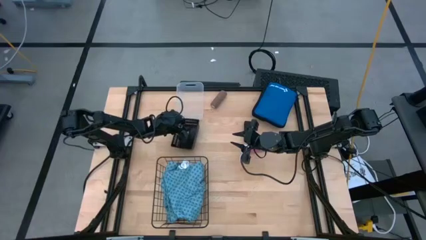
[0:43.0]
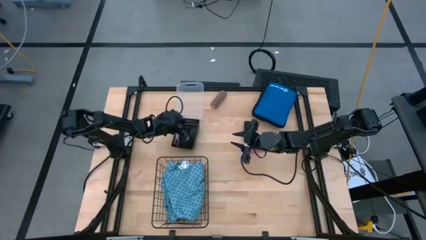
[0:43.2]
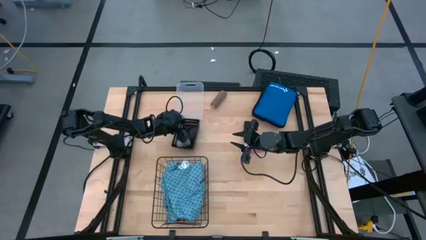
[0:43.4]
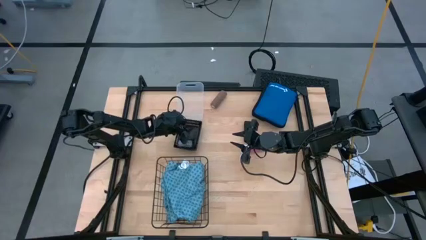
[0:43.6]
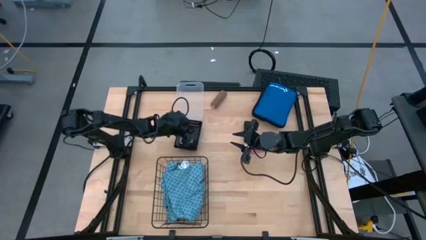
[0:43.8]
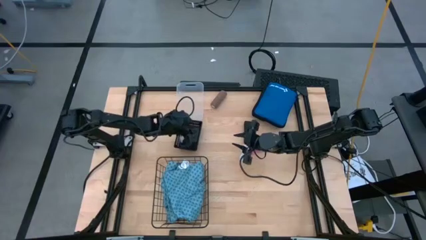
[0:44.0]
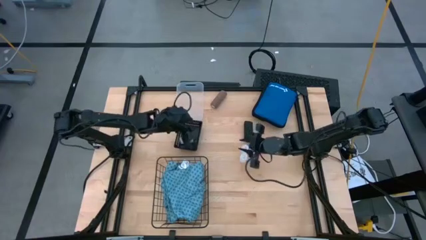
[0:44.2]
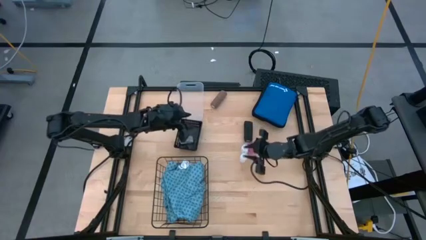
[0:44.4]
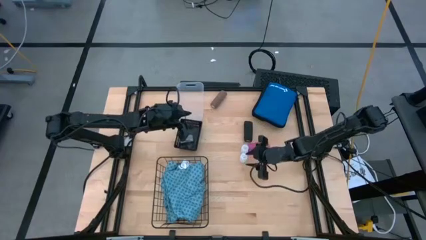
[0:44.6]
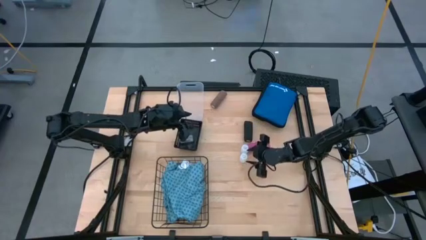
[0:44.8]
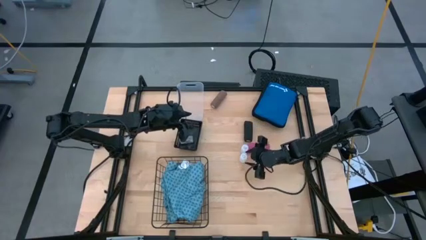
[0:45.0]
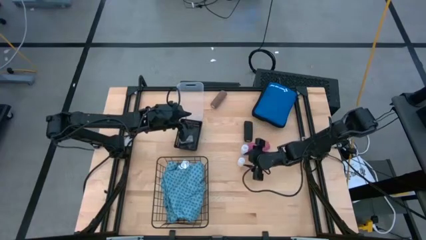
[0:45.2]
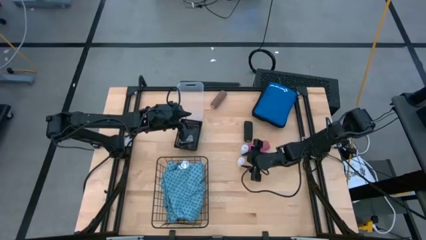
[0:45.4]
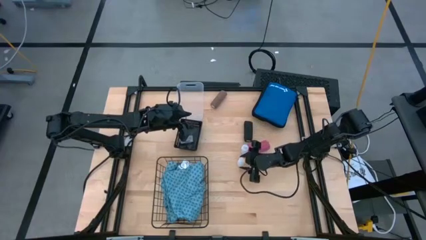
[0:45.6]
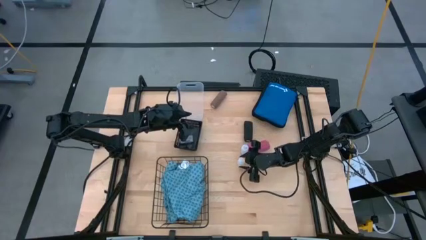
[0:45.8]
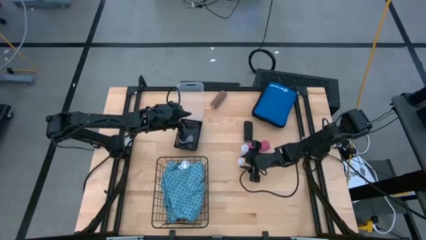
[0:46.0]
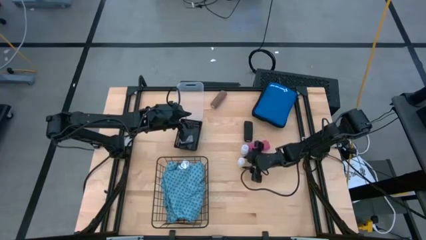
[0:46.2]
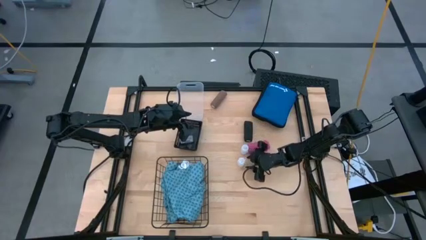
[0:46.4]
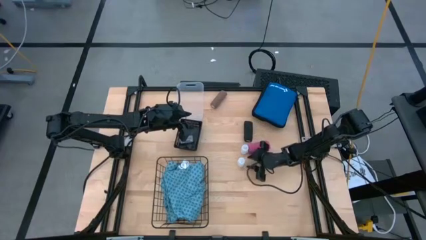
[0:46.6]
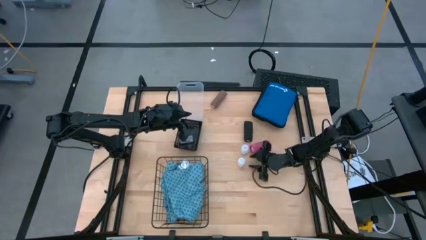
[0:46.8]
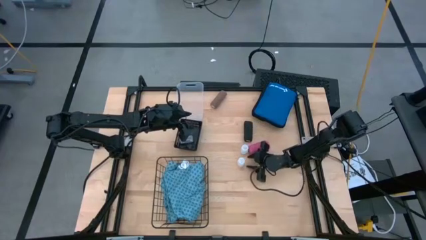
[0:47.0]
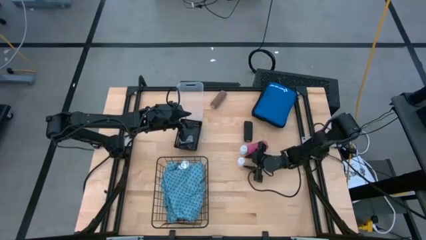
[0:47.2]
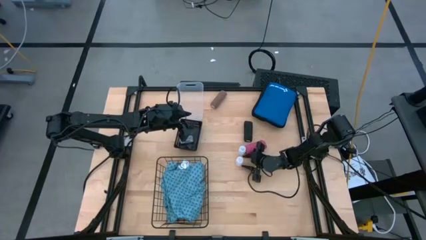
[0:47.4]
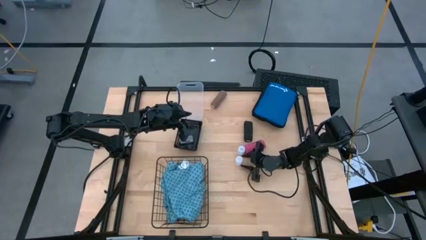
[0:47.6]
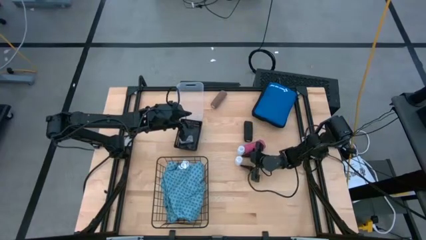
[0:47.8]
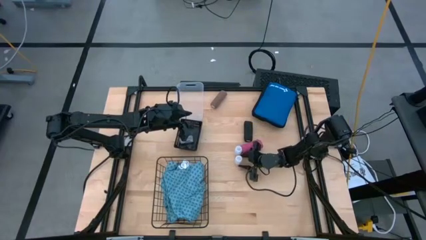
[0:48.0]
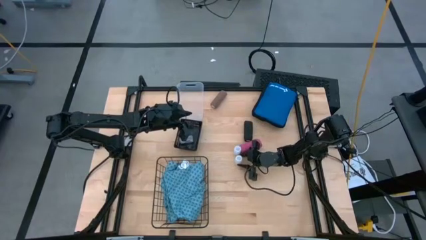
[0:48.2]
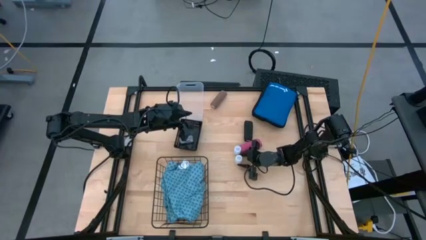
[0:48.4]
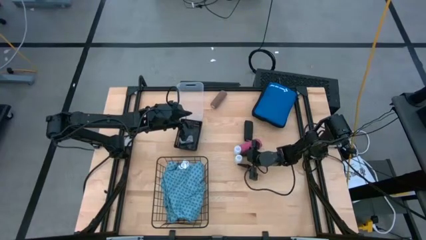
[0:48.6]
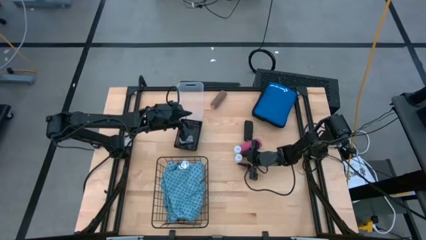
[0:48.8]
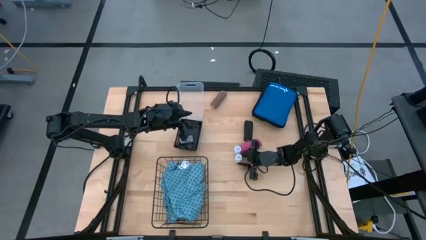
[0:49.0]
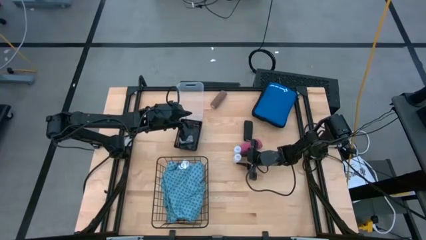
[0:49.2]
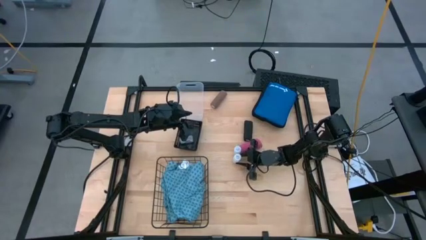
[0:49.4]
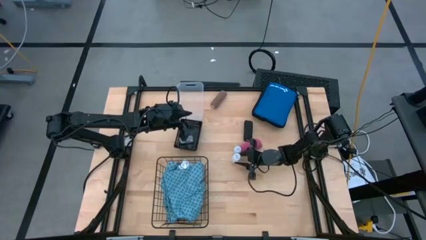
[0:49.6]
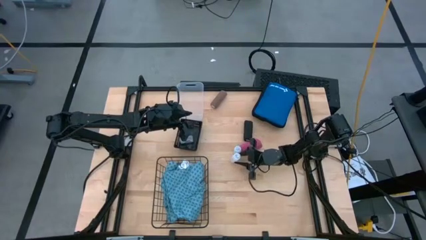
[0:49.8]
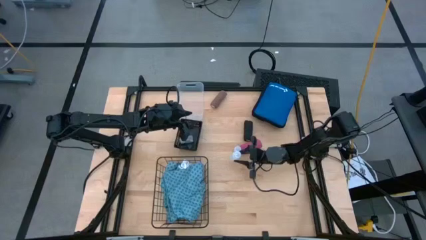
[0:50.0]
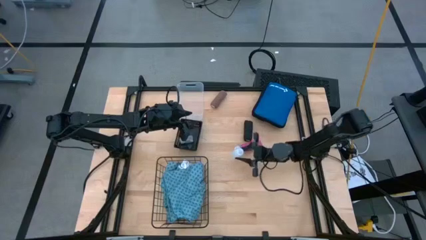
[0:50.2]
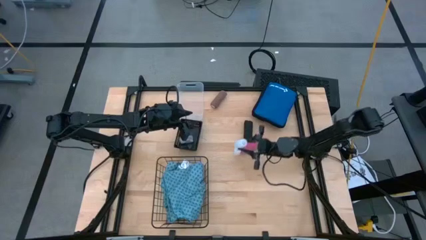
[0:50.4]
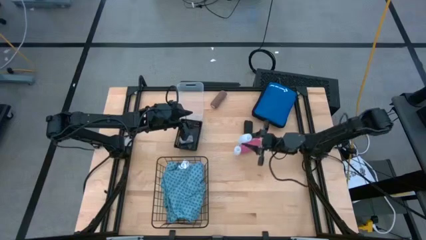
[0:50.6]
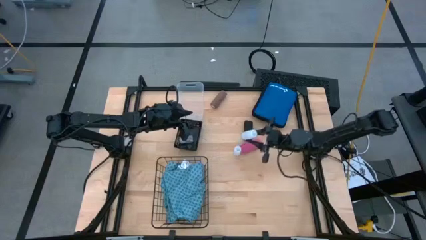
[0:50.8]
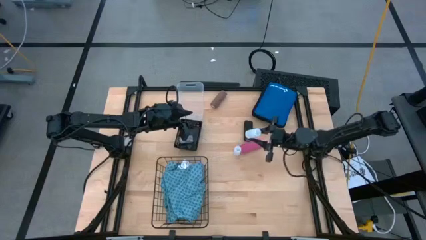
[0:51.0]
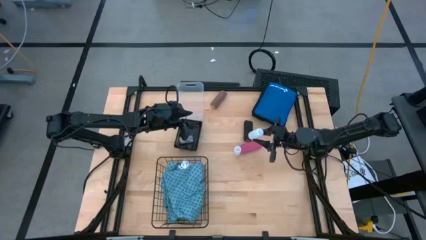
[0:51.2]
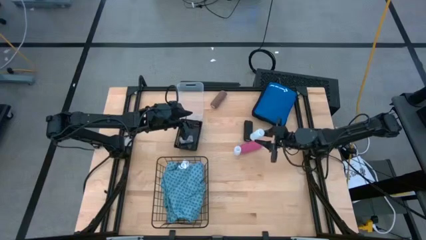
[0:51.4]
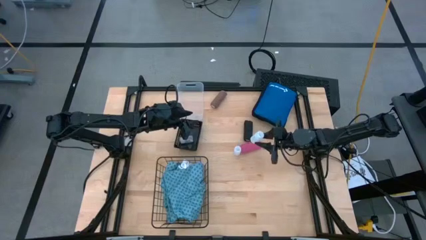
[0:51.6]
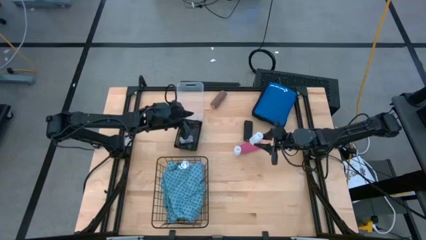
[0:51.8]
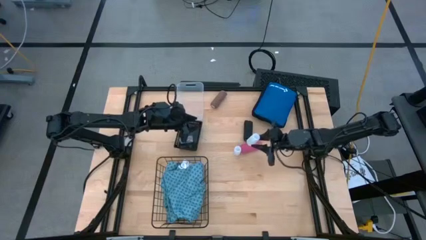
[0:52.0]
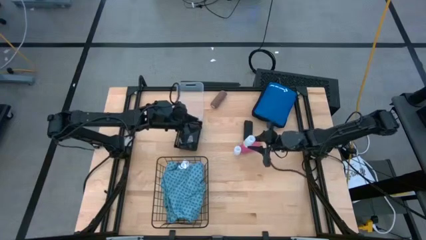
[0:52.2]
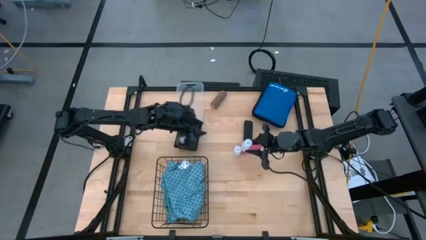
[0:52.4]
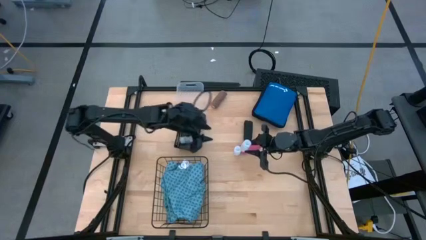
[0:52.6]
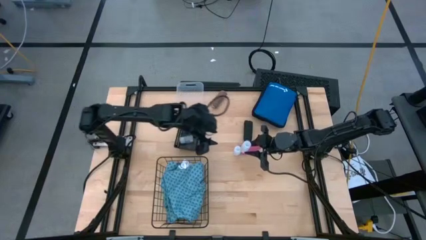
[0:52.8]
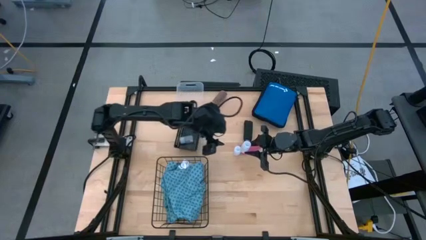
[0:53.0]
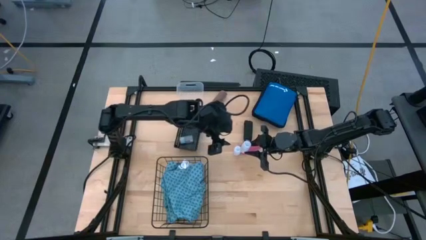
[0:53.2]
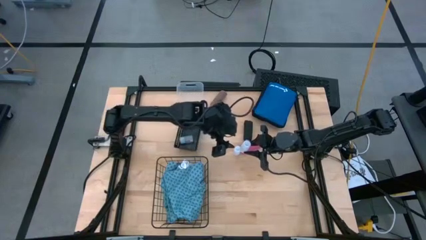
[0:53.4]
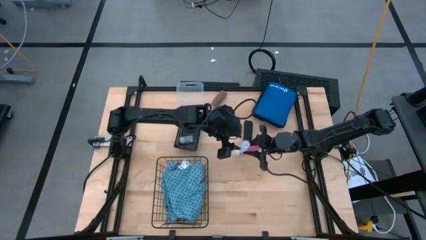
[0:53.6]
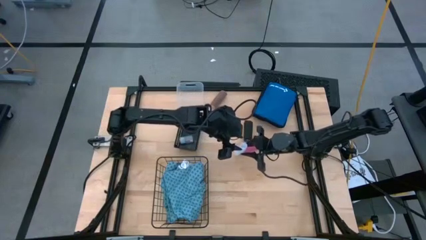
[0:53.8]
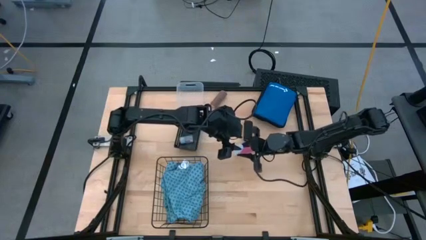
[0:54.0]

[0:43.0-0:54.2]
Task: Pick & place medical supplies in basket/bin
Put the bottom white pill bottle into the black bin
